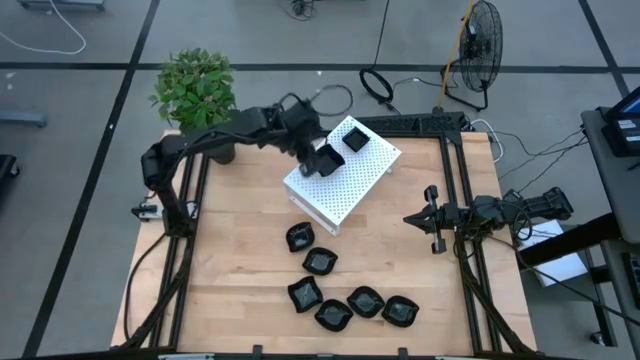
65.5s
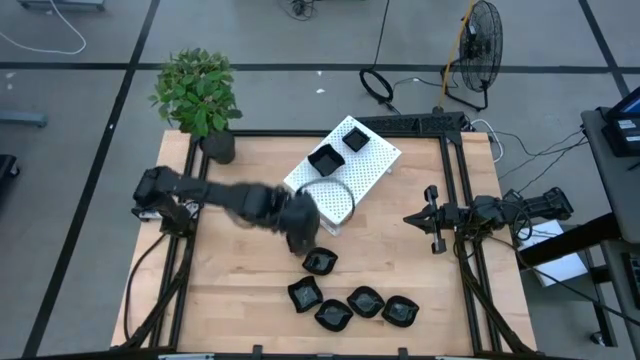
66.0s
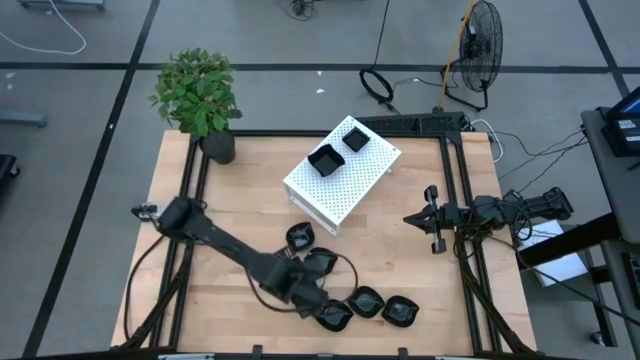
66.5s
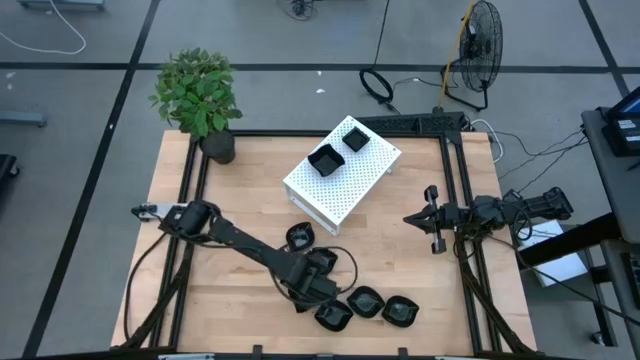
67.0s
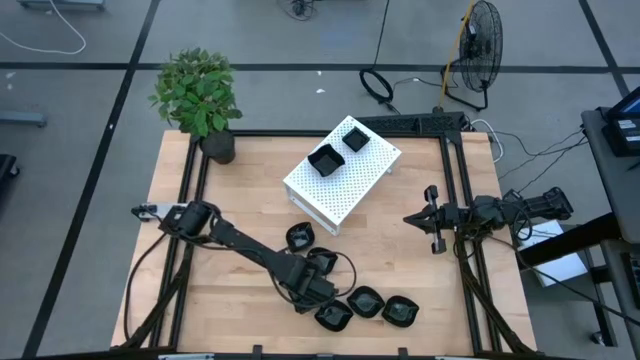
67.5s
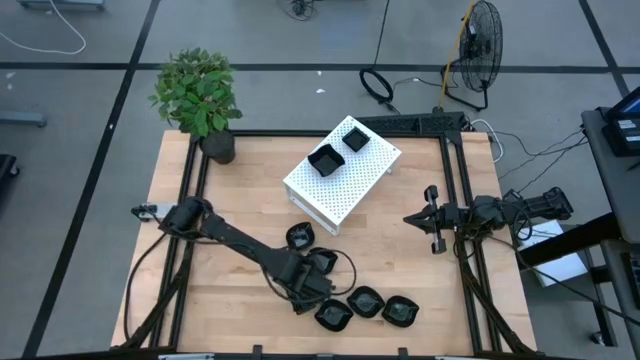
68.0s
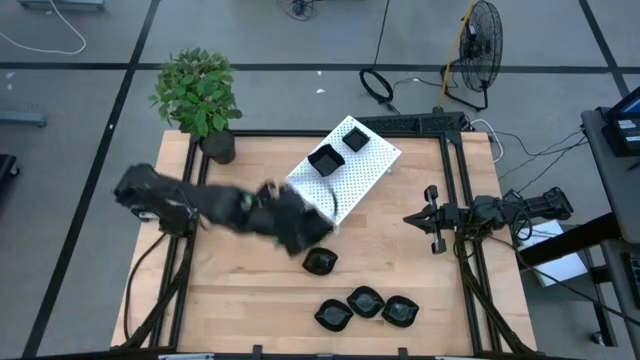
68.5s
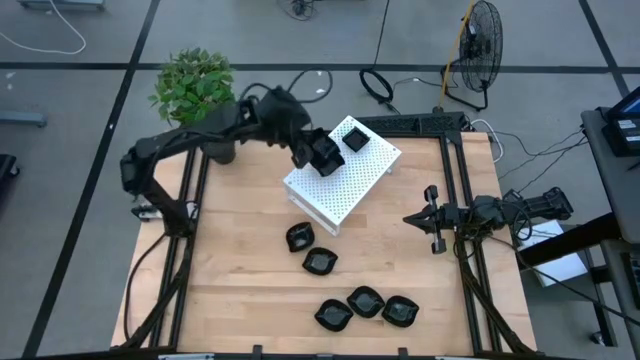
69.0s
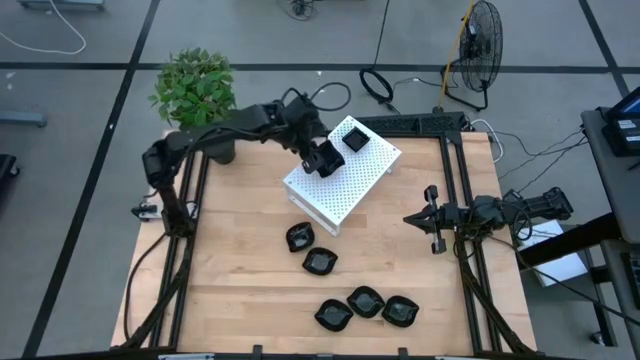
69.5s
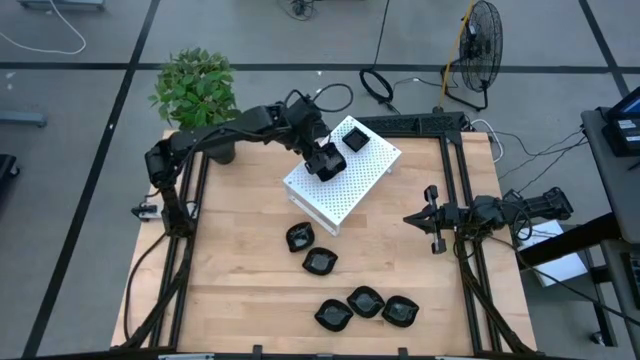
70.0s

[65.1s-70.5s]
Task: Pick & Place Mini shaped plates
Stack the black distorted square plate on top of the black distorted square plate on the shelf

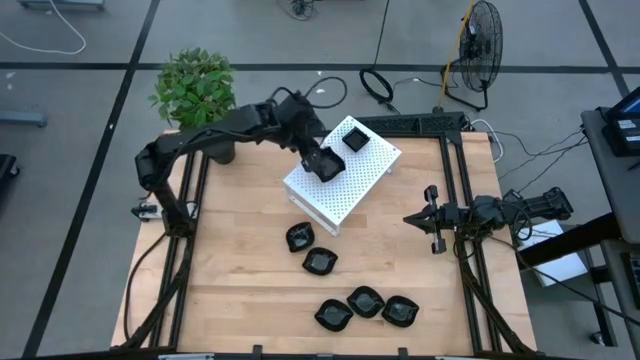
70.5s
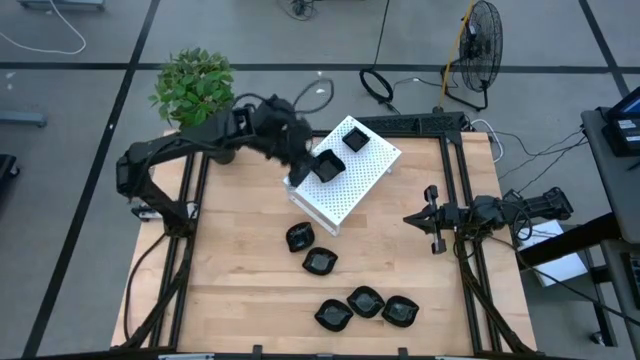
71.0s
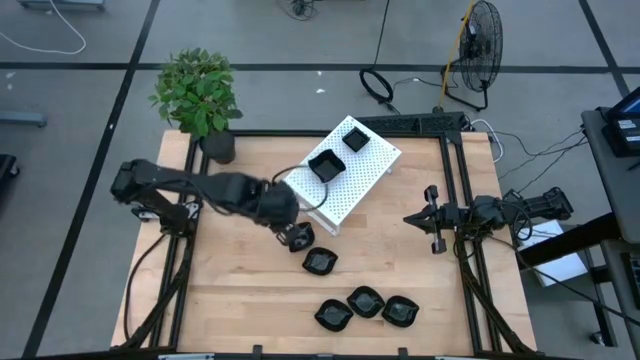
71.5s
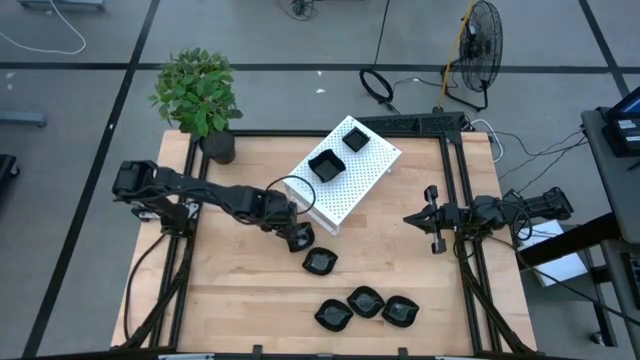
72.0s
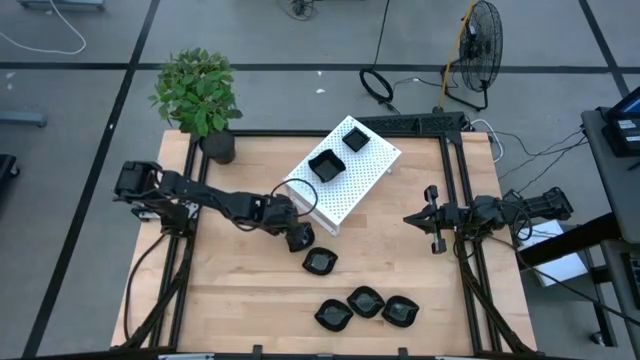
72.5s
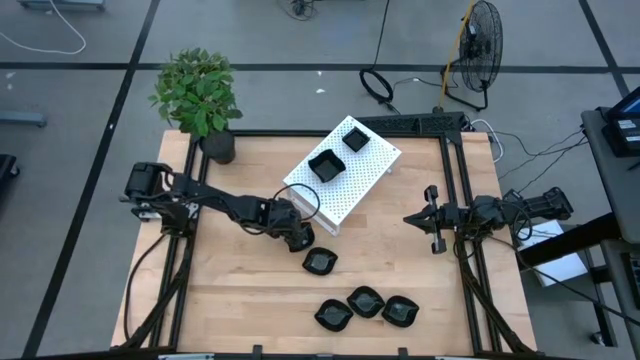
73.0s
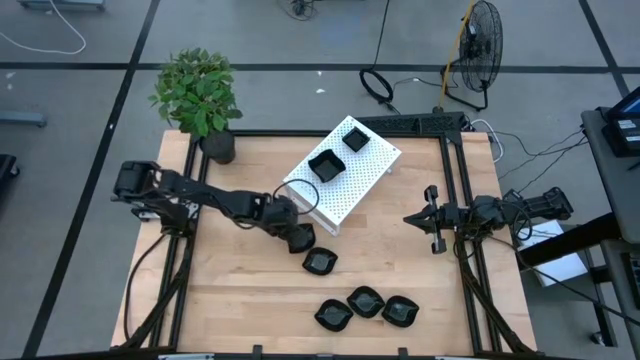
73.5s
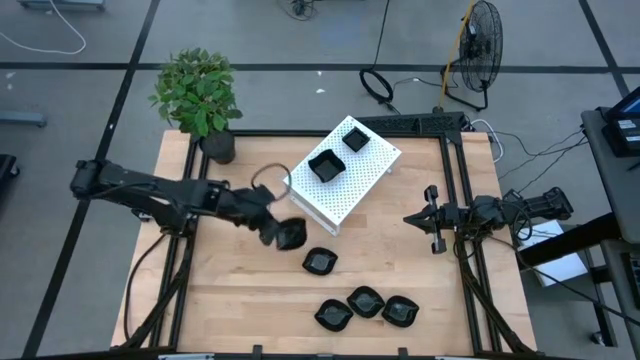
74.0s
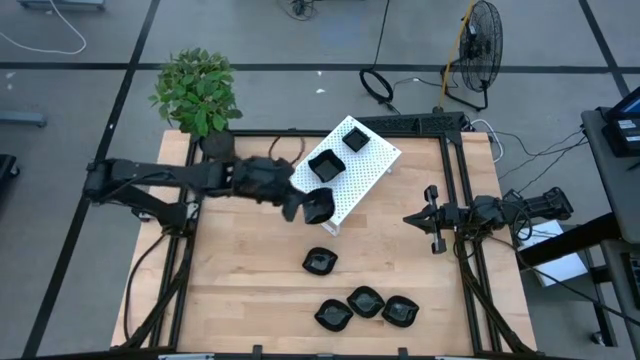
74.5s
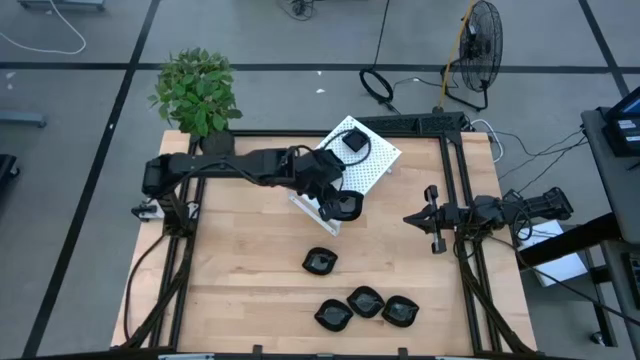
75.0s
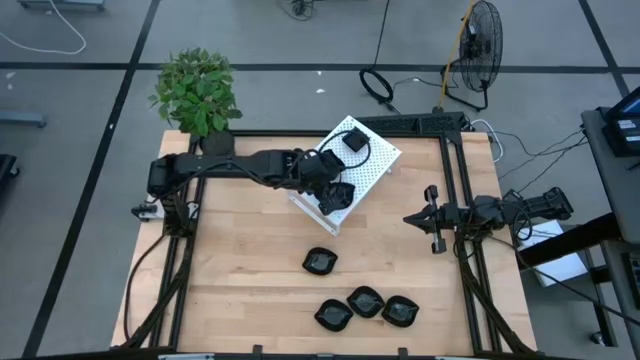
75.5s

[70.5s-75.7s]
Put the leaf shaped plate on the shelf

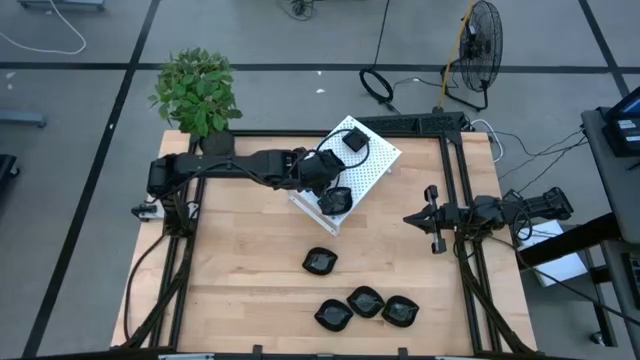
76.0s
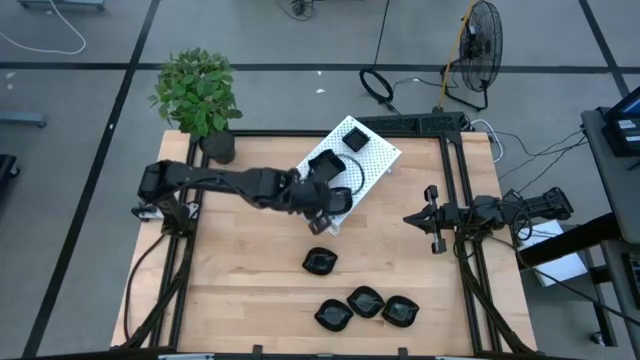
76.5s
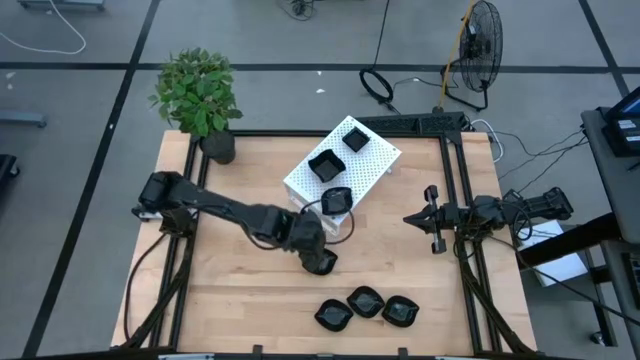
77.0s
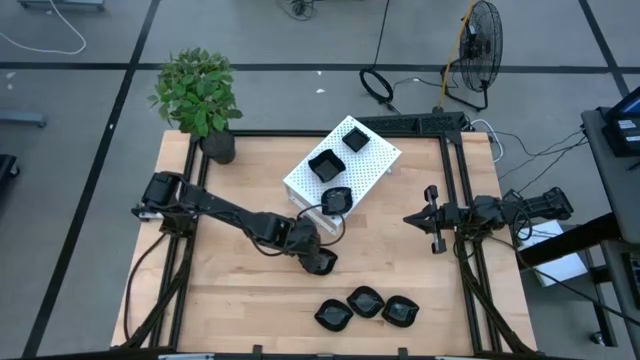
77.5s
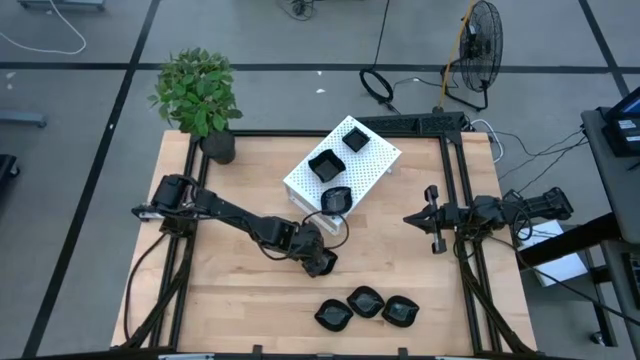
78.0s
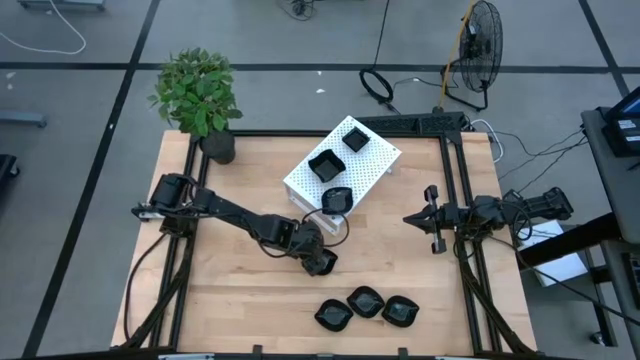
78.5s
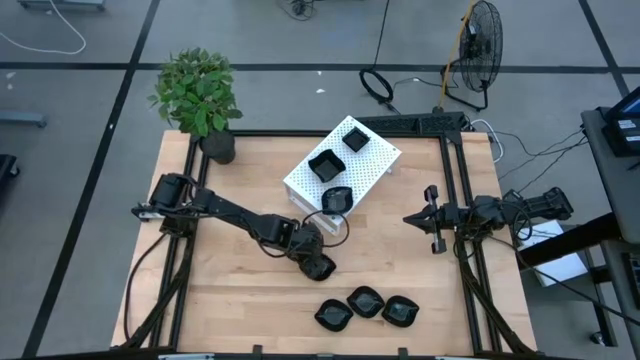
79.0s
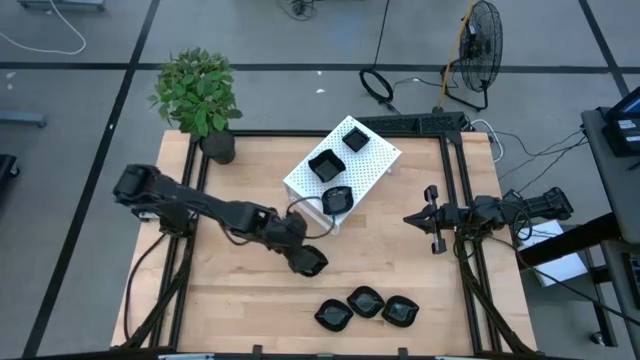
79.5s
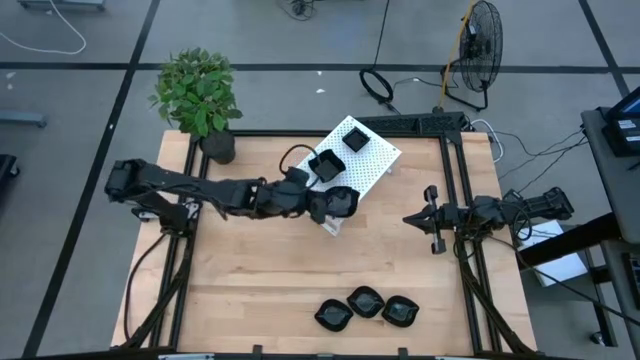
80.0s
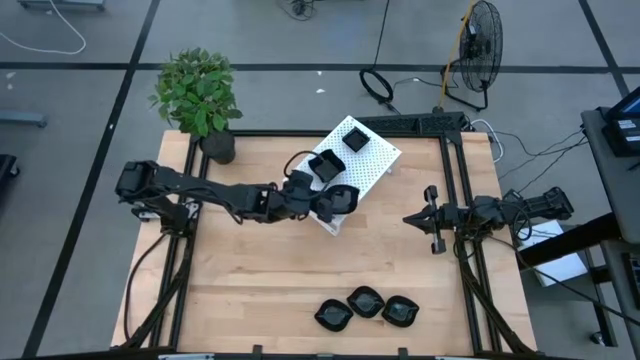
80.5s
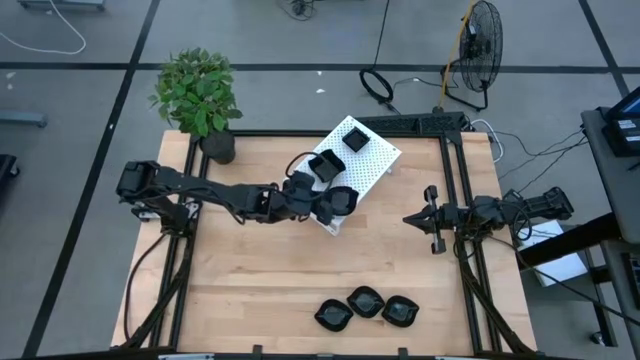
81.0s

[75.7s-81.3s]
Stack the black leaf shaped plate on top of the black leaf shaped plate on the shelf

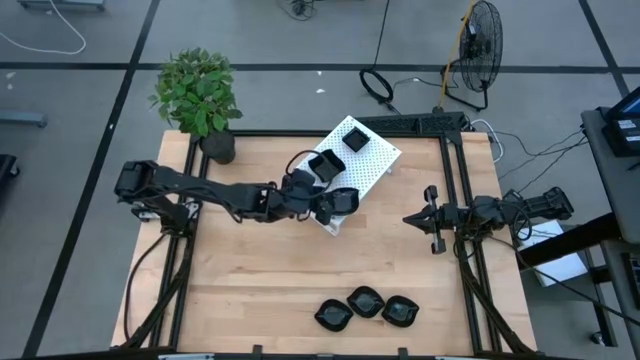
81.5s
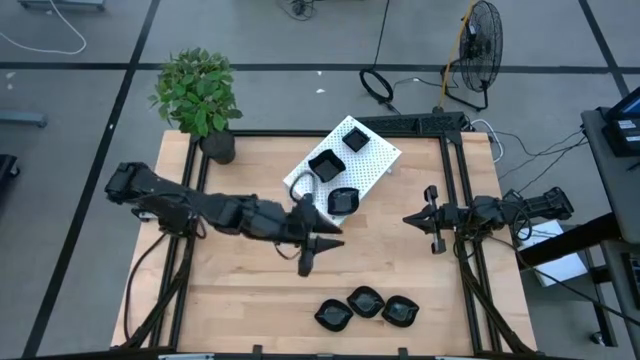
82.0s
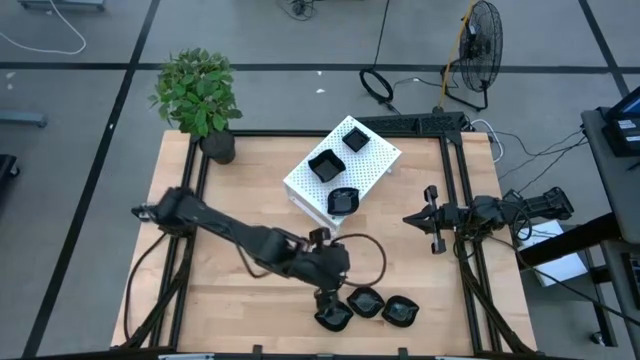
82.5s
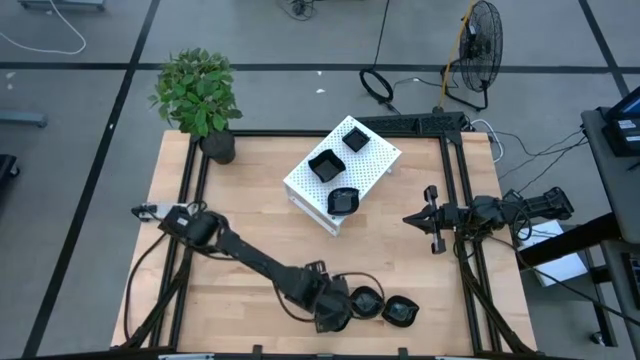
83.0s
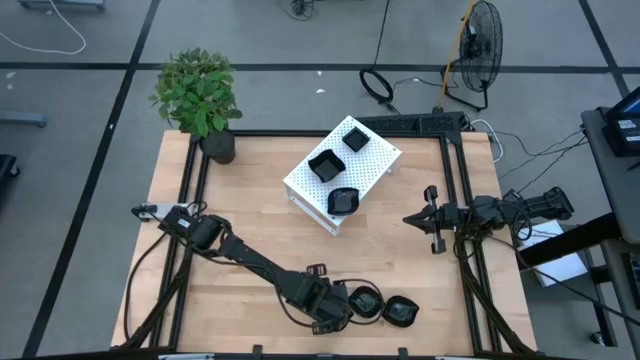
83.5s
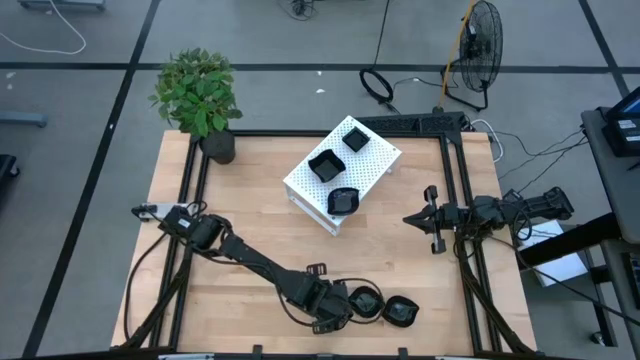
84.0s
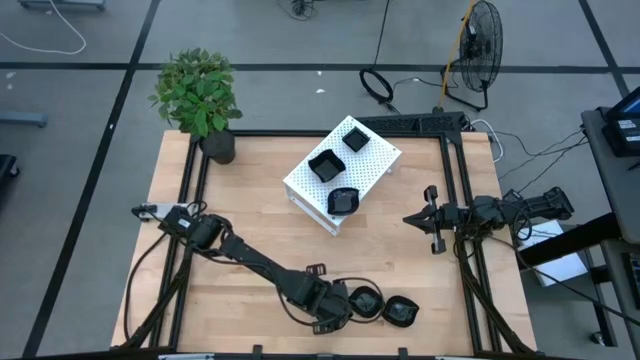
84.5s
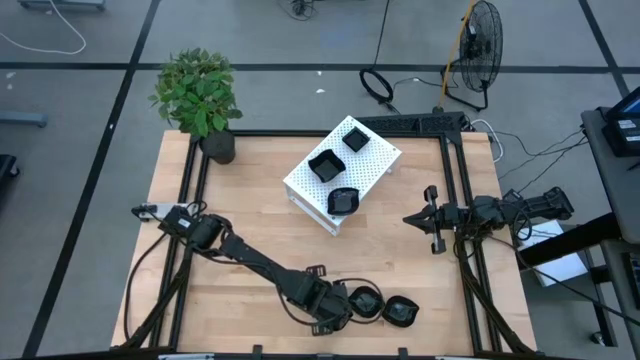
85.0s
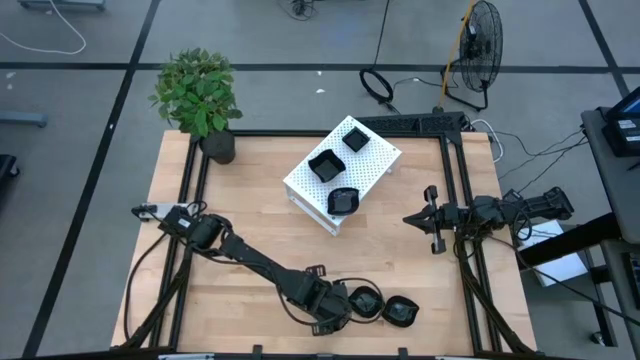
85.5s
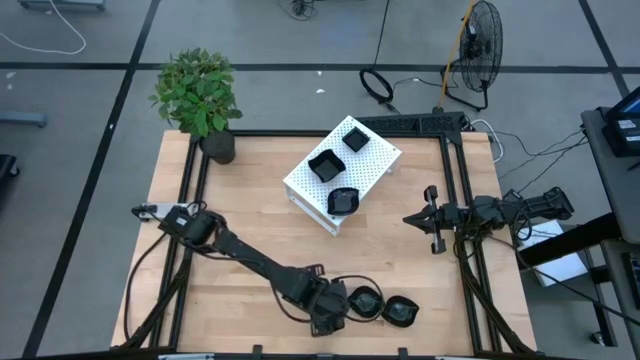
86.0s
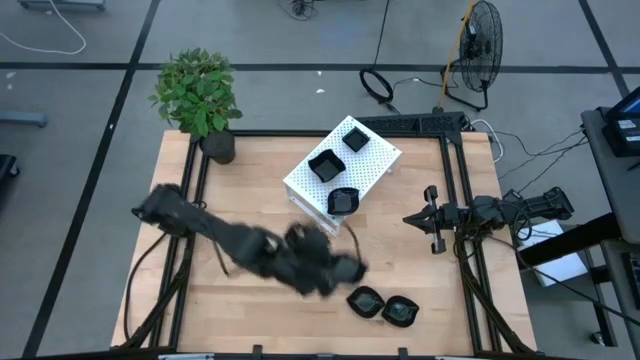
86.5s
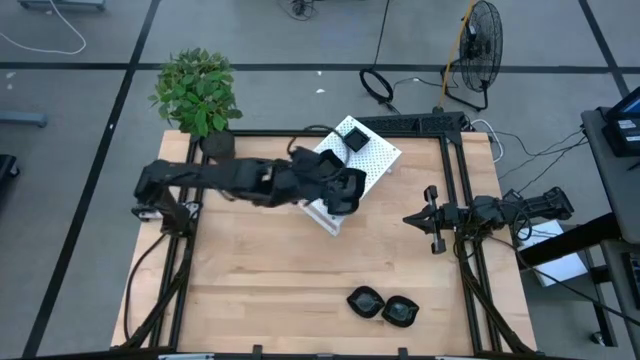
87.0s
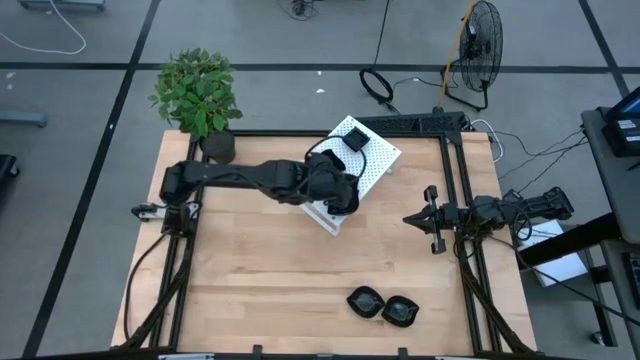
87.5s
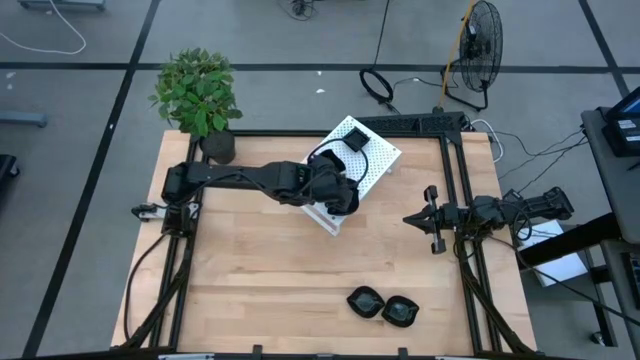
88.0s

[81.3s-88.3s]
Stack the black leaf shaped plate on top of the black leaf shaped plate on the shelf
